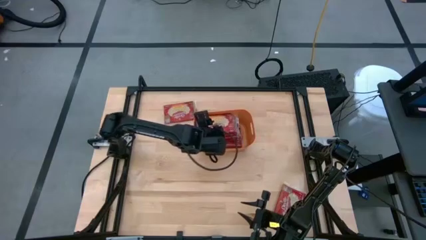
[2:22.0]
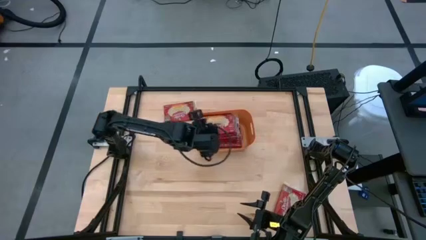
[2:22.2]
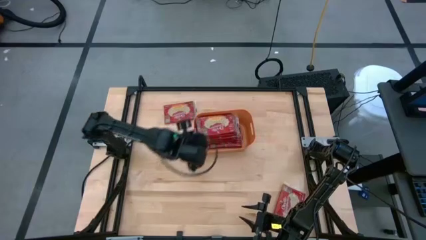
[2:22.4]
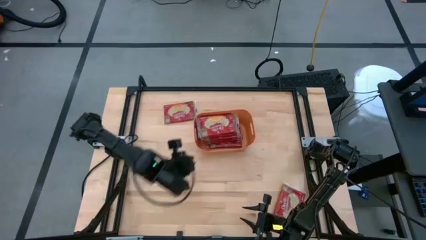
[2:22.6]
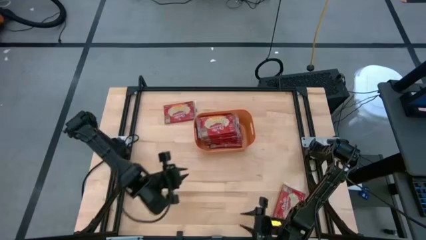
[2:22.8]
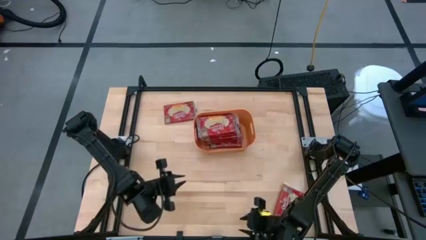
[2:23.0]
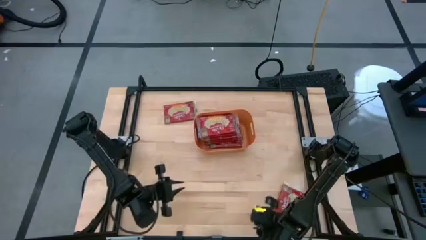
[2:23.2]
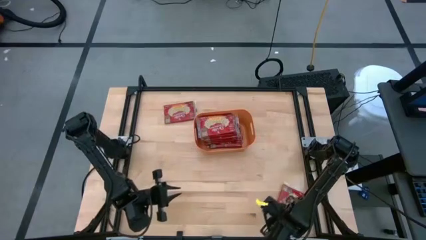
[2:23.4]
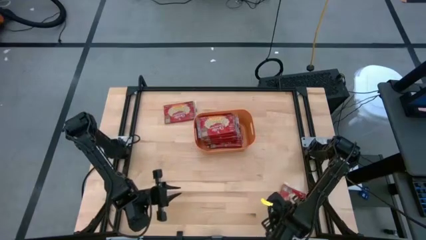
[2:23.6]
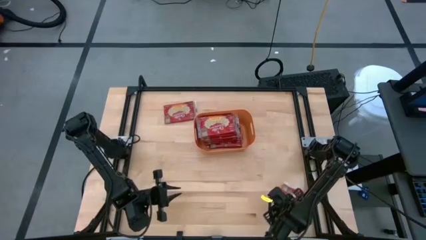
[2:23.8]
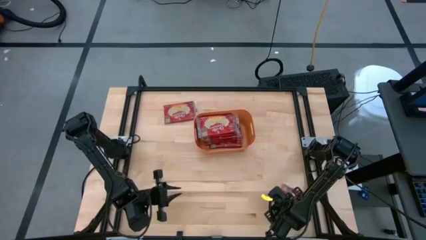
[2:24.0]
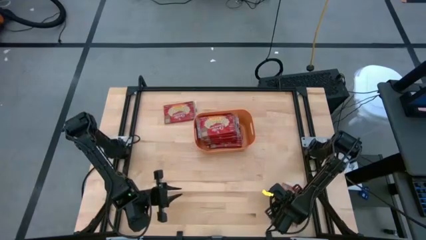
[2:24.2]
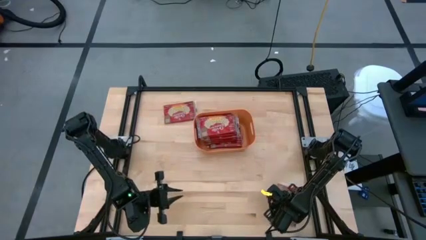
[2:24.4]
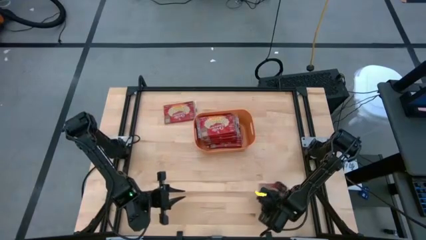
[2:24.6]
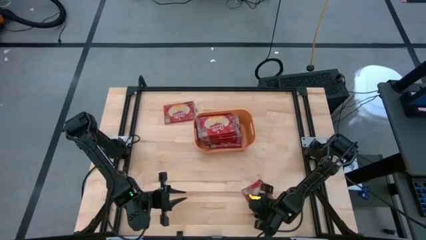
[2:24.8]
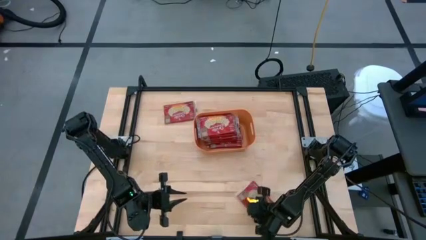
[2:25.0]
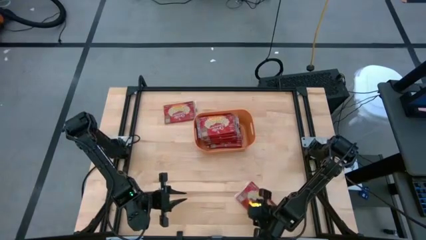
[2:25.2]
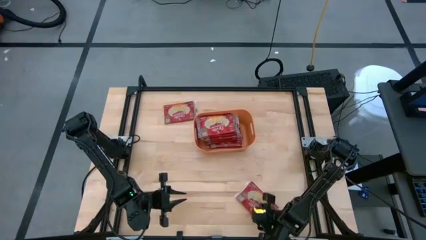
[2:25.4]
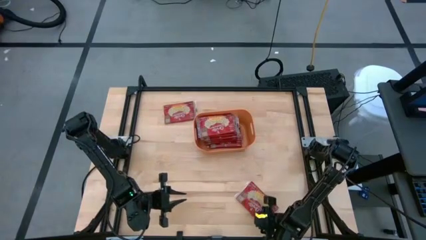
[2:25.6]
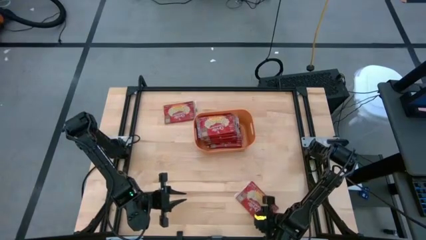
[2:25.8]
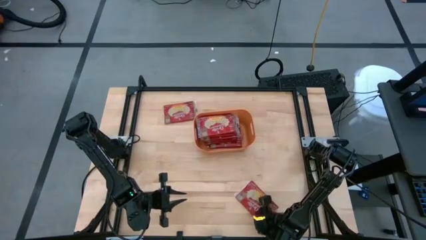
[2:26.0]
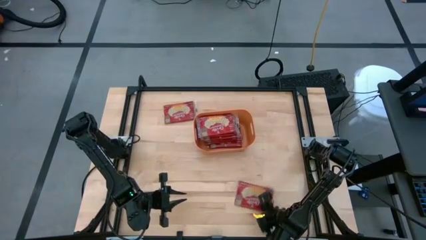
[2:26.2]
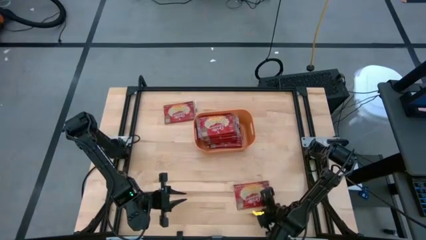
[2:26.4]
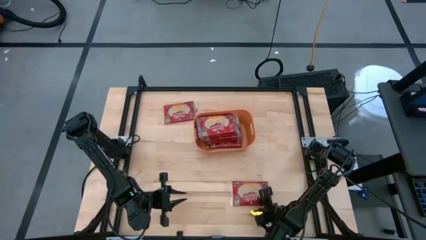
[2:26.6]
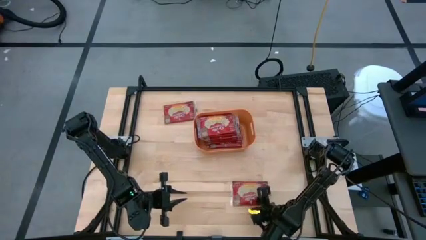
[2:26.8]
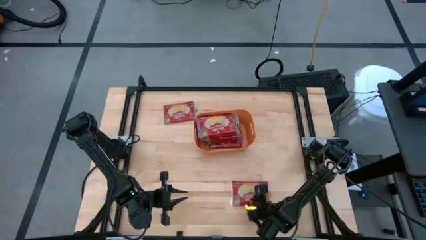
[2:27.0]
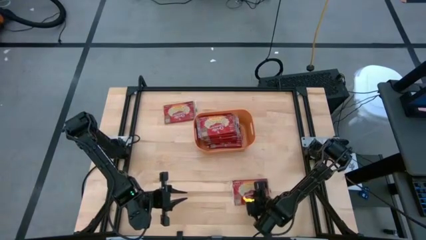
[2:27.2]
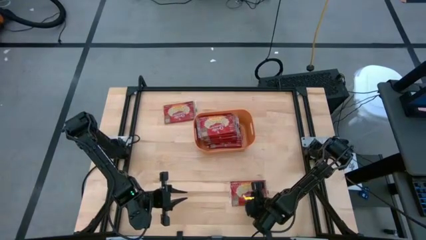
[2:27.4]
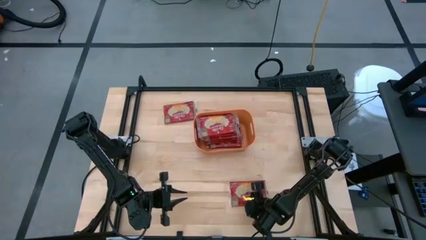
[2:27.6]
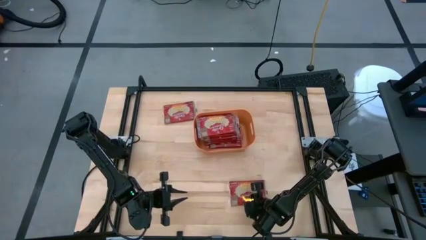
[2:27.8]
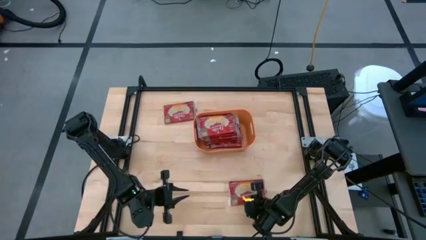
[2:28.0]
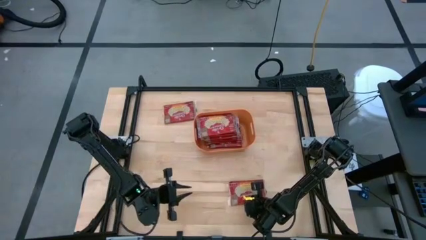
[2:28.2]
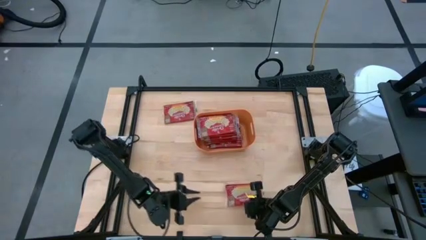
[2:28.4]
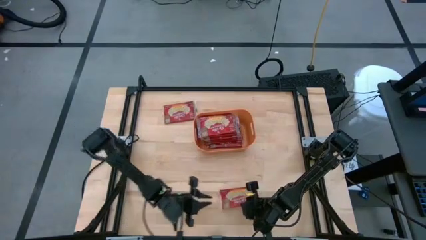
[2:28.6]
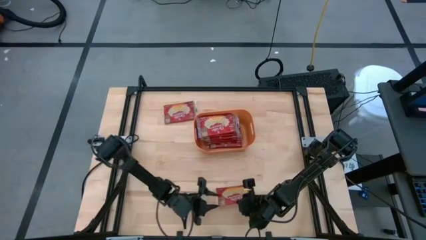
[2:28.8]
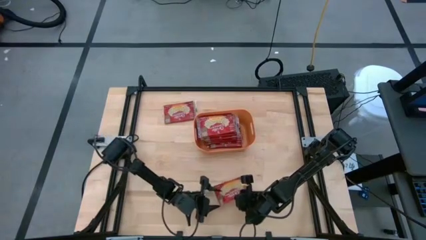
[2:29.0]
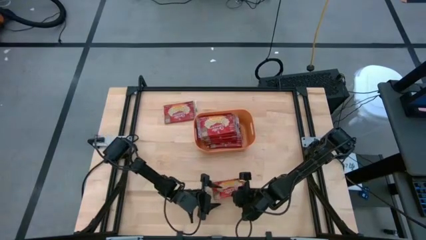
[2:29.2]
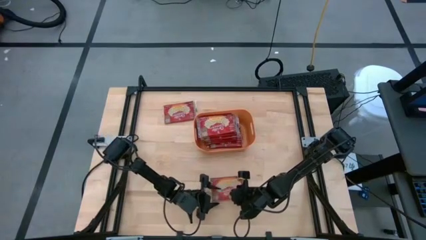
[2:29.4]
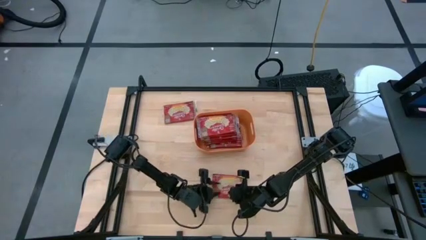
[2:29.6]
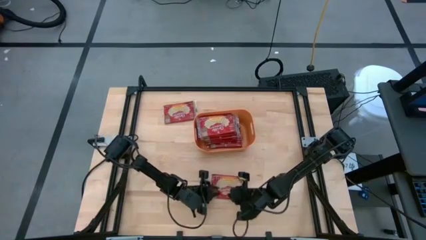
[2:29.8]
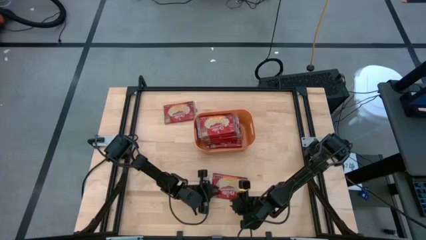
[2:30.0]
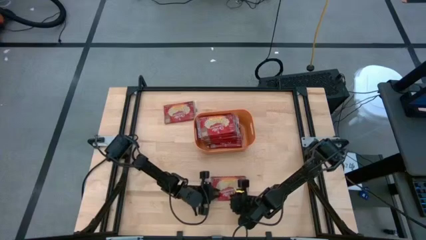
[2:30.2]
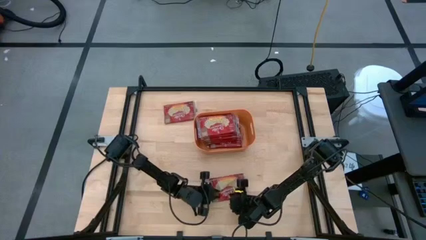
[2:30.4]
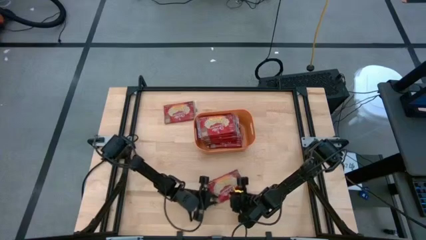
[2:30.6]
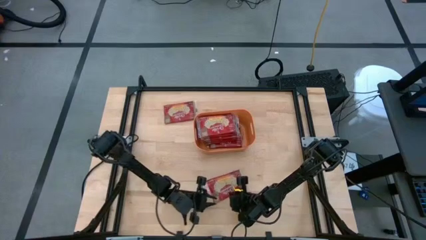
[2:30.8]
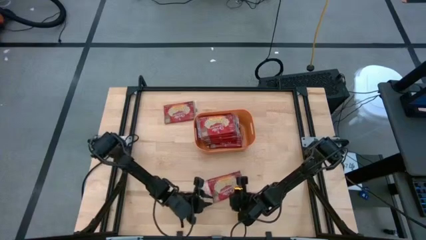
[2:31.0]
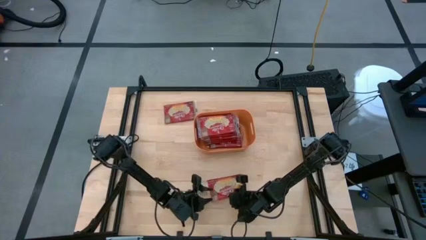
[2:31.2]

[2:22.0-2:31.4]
Task: Sort popcorn bags into baskets
Put the red popcorn bag into the orange bin

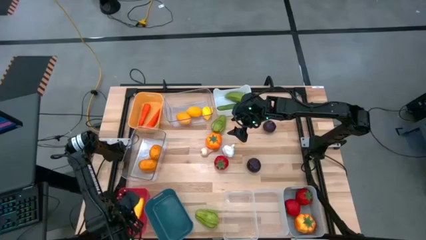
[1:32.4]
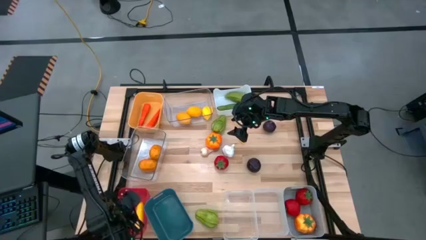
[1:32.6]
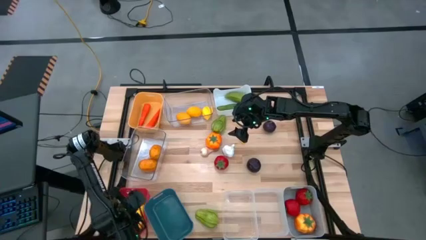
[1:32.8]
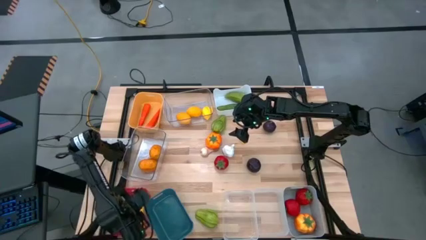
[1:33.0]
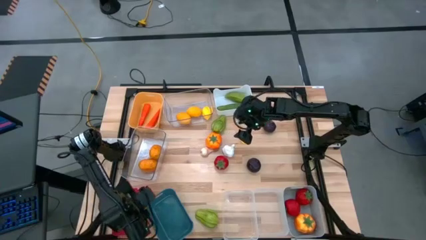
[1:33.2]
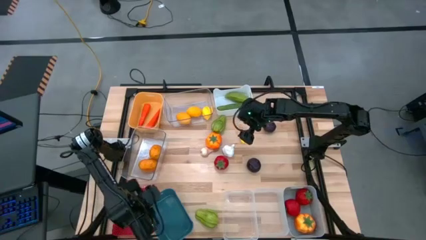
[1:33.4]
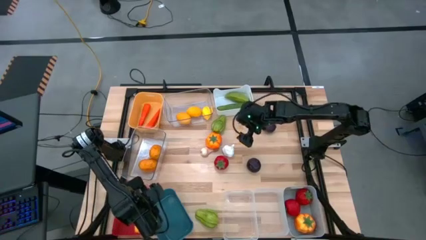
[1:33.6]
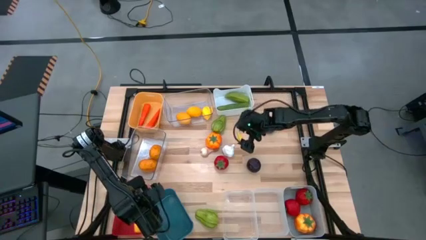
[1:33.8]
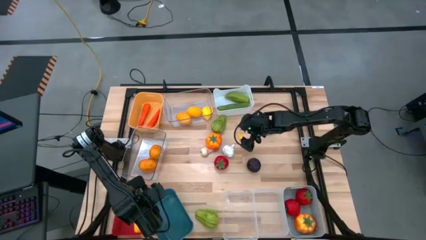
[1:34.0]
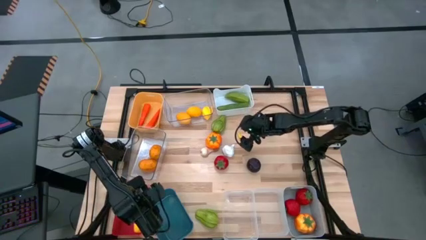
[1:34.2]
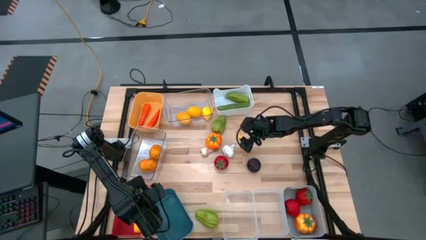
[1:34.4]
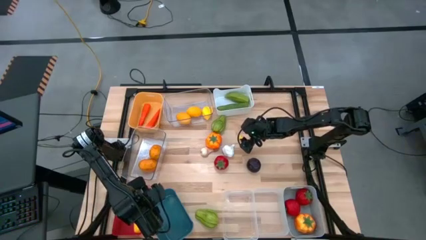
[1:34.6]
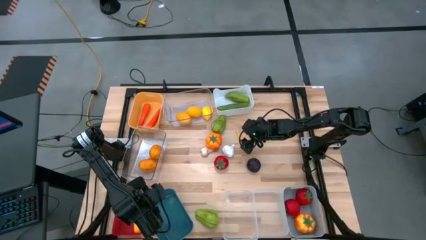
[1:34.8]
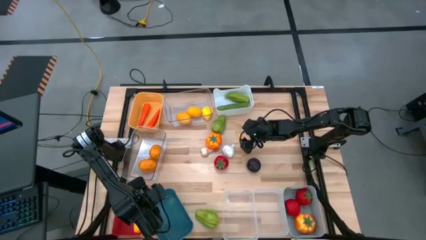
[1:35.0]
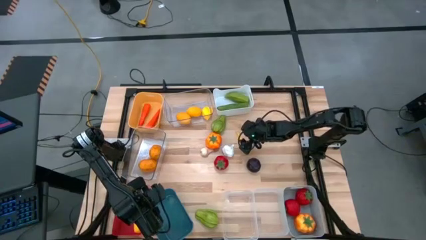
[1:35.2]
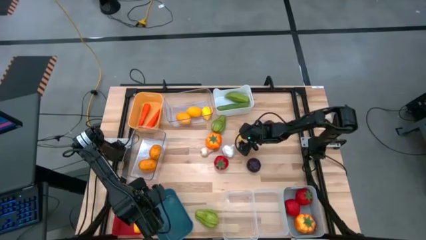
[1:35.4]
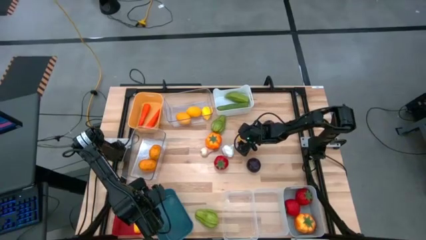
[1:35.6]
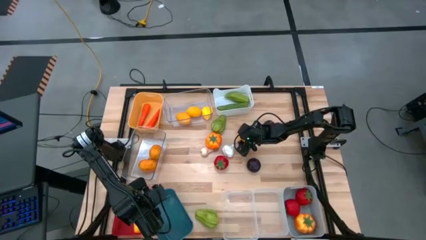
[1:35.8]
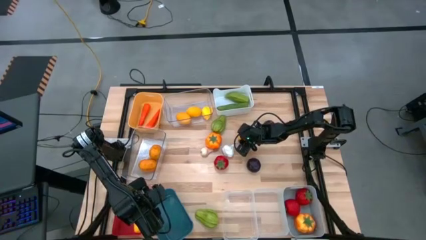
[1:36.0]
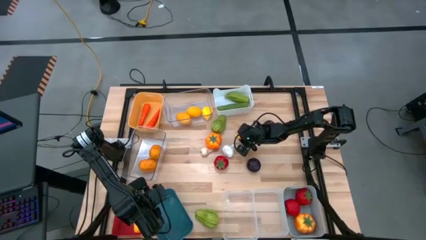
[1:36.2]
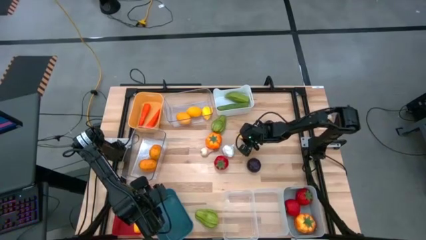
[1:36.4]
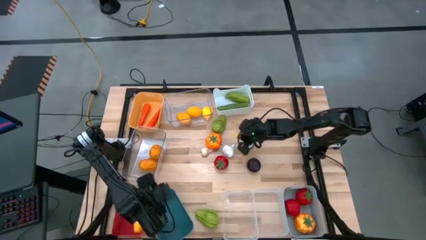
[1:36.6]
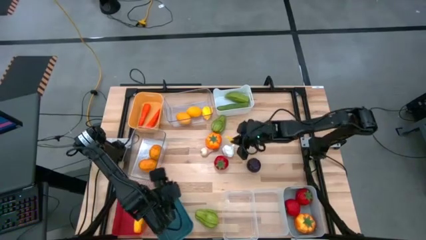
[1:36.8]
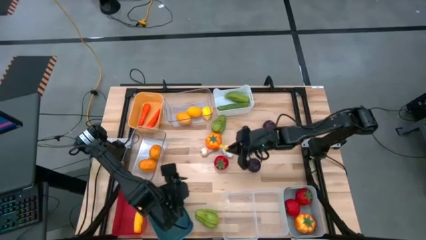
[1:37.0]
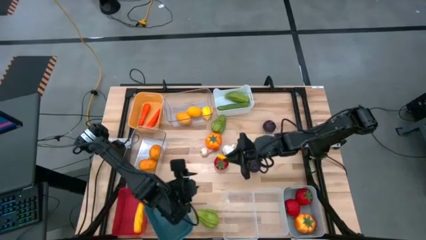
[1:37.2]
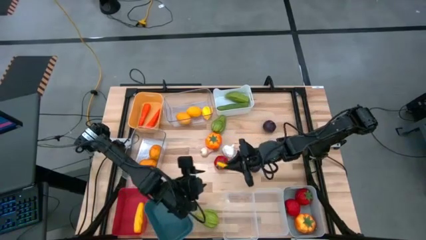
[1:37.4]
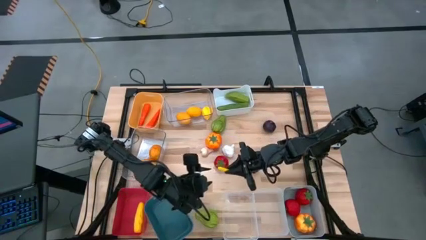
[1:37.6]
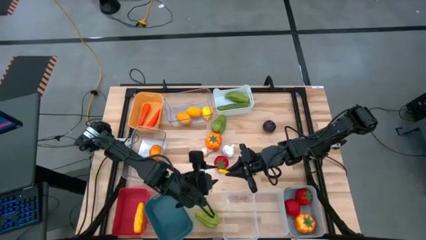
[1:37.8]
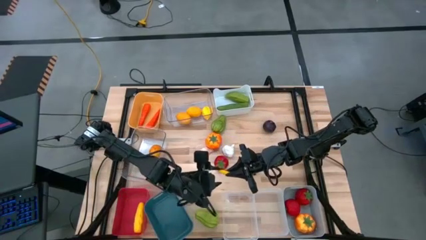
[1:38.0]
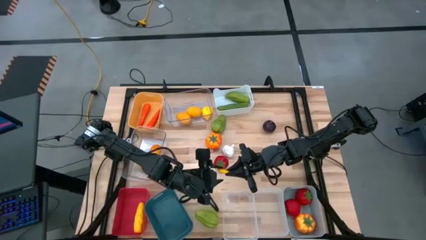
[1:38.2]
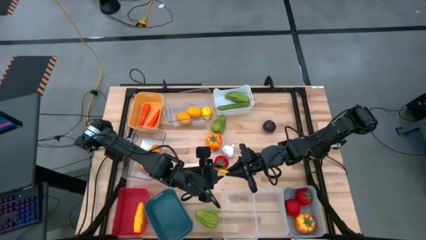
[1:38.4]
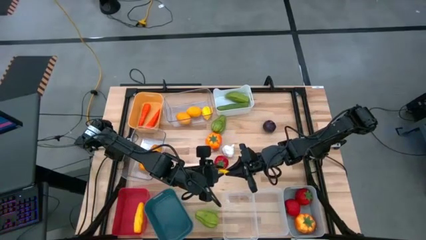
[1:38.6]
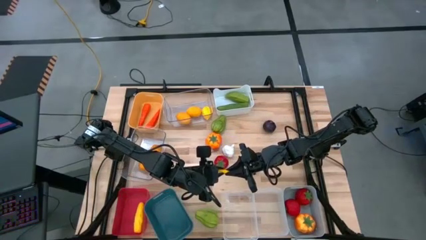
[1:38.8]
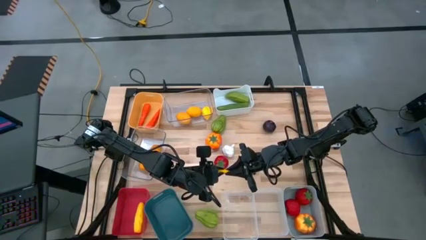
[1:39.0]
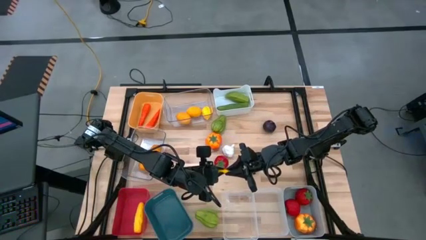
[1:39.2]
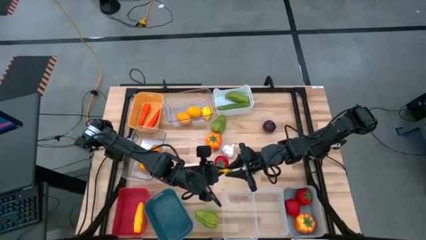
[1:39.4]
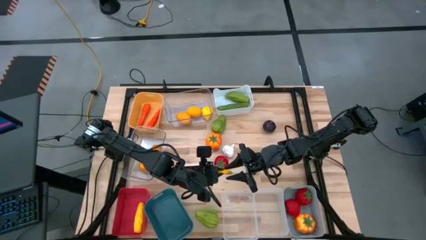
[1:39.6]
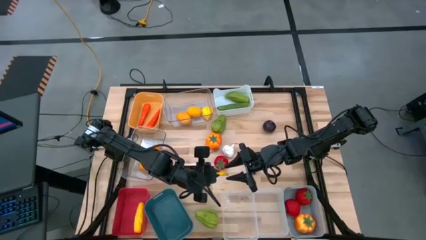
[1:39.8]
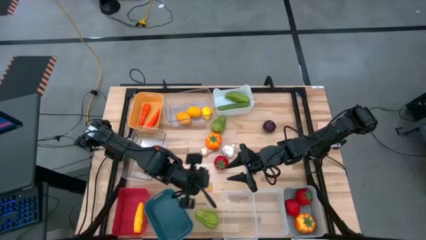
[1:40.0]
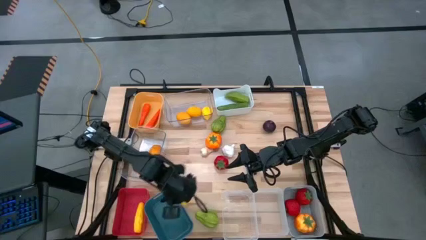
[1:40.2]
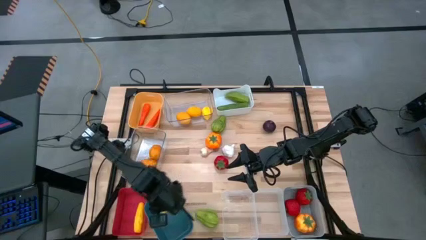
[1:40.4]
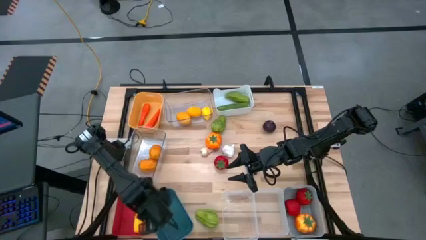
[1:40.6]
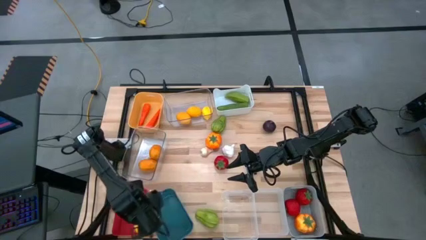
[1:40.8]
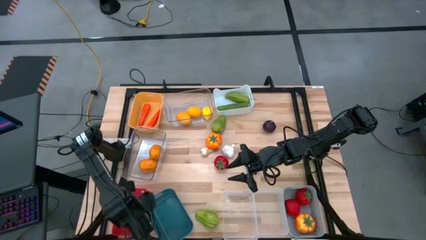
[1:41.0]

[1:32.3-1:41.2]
Task: Sort produce into baskets
Put the yellow corn into the red bin
